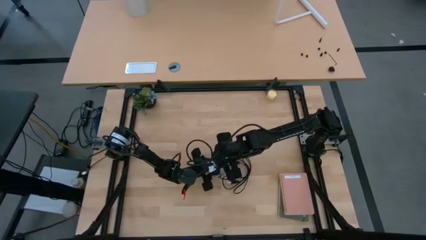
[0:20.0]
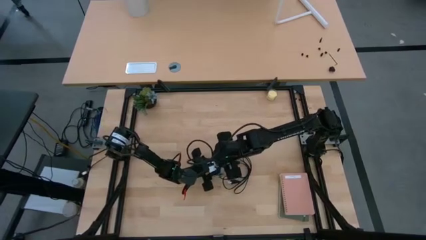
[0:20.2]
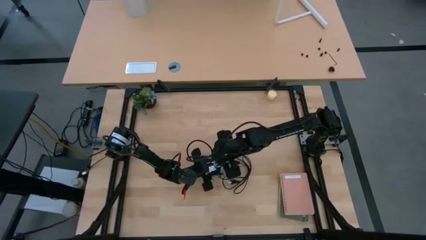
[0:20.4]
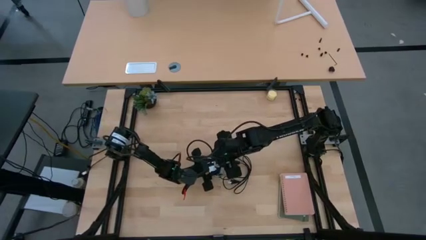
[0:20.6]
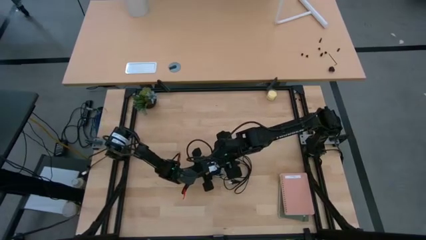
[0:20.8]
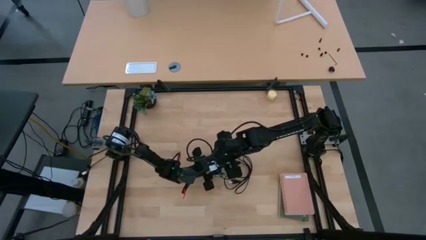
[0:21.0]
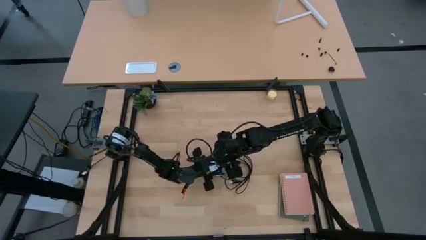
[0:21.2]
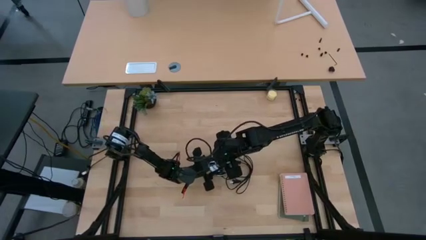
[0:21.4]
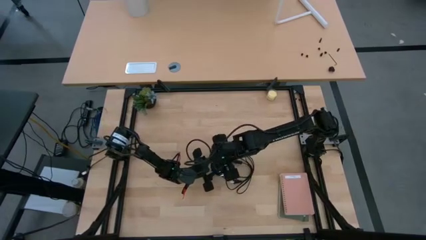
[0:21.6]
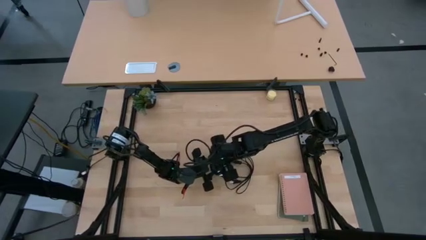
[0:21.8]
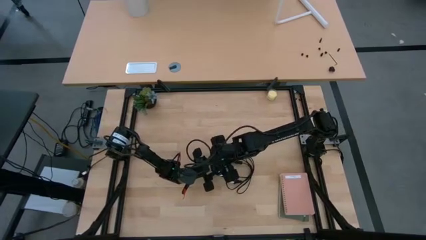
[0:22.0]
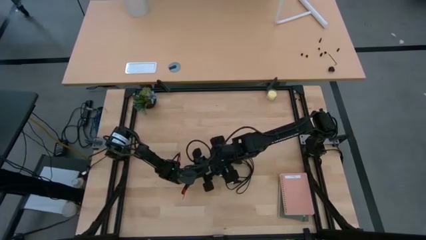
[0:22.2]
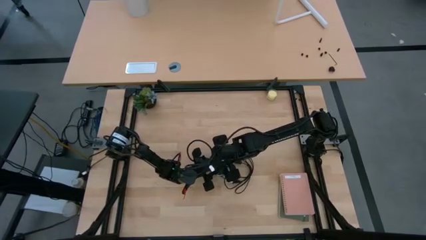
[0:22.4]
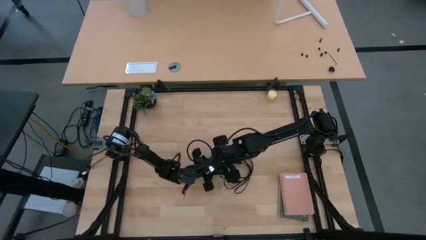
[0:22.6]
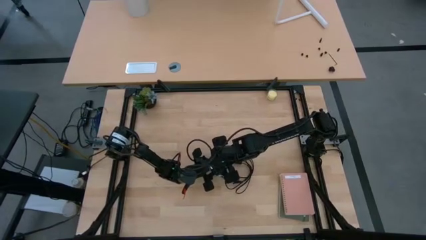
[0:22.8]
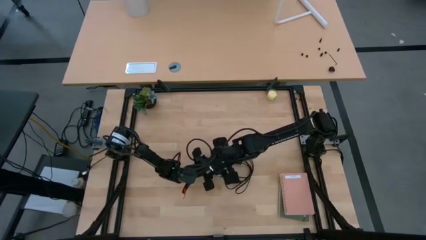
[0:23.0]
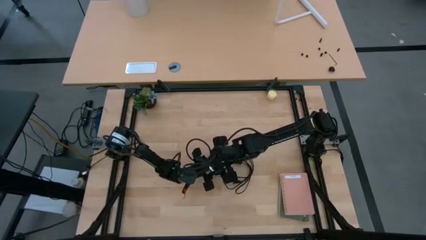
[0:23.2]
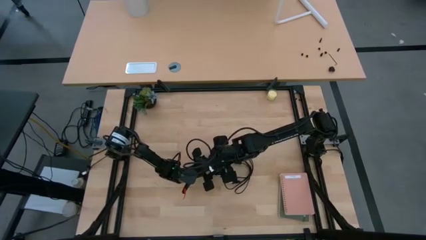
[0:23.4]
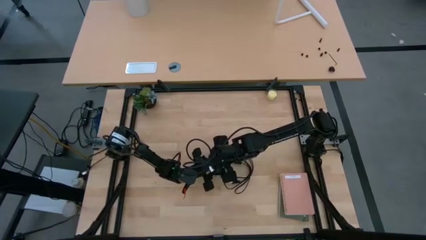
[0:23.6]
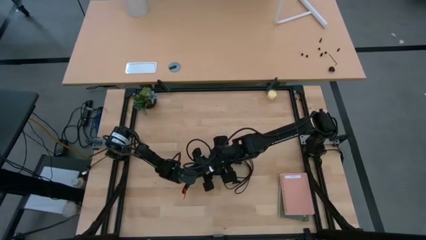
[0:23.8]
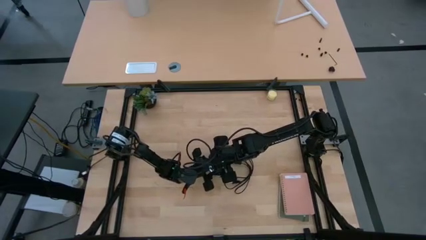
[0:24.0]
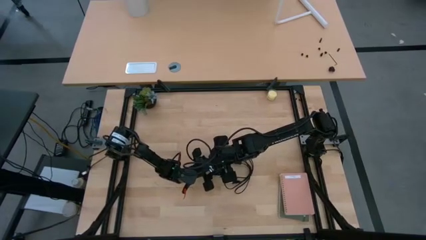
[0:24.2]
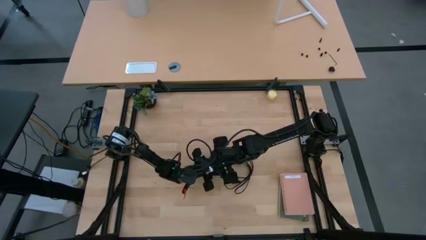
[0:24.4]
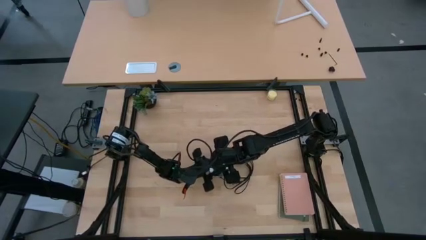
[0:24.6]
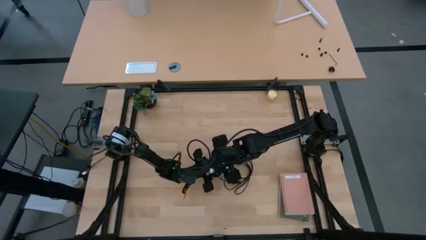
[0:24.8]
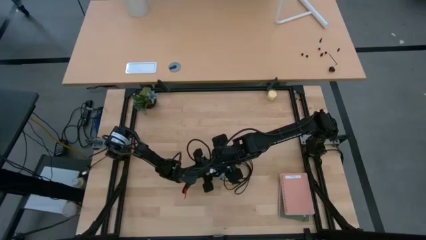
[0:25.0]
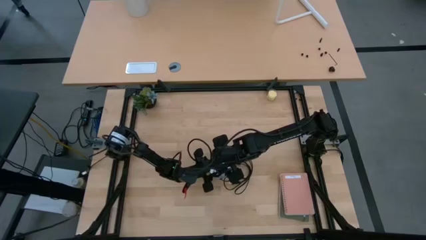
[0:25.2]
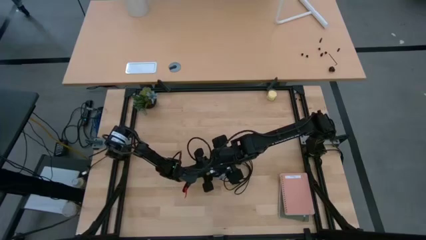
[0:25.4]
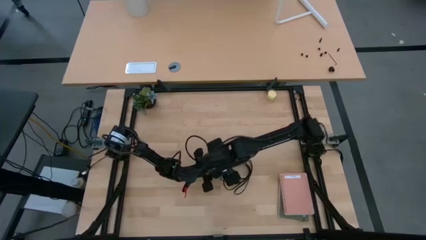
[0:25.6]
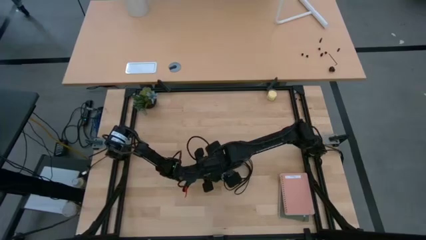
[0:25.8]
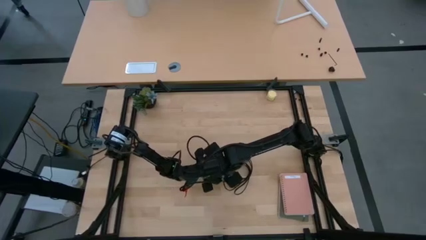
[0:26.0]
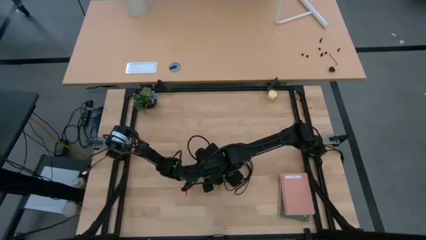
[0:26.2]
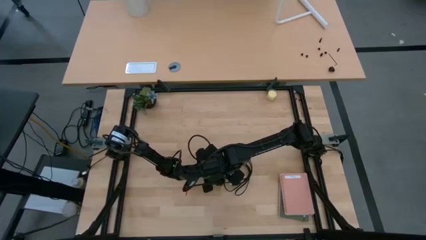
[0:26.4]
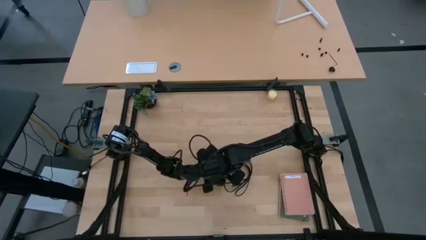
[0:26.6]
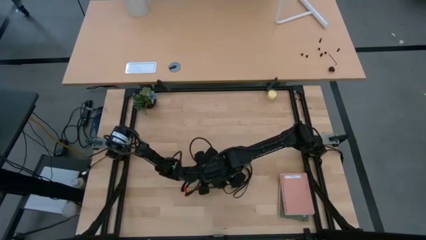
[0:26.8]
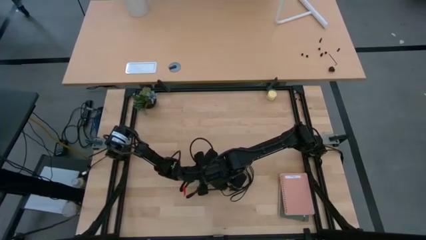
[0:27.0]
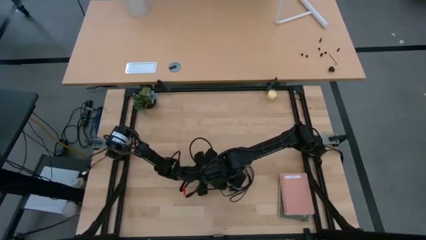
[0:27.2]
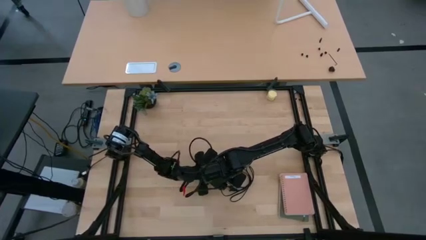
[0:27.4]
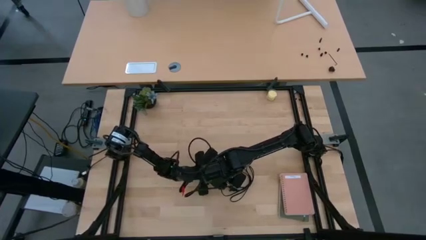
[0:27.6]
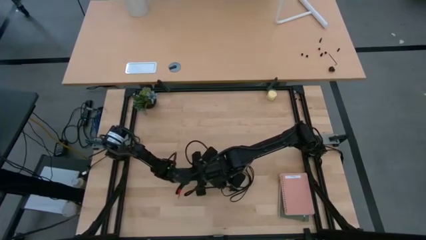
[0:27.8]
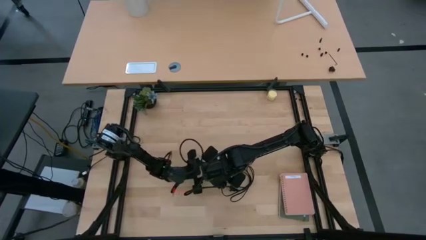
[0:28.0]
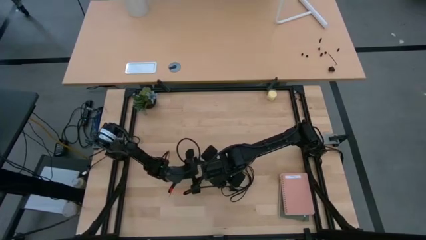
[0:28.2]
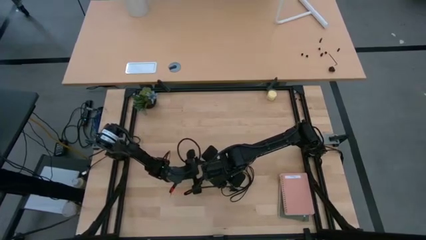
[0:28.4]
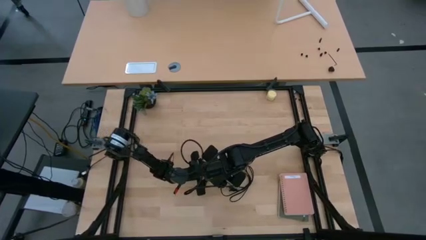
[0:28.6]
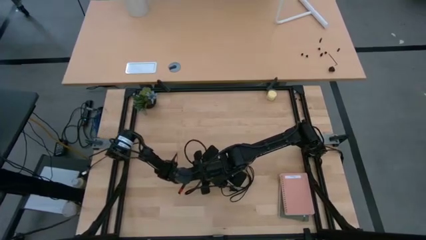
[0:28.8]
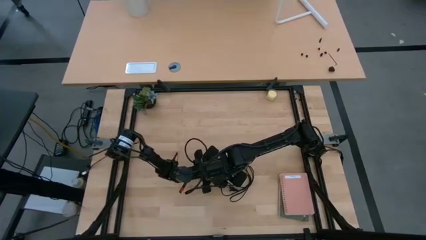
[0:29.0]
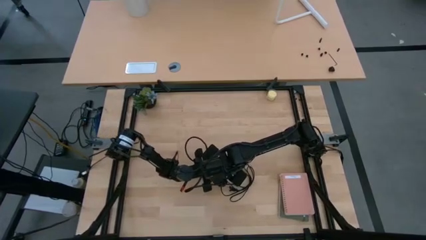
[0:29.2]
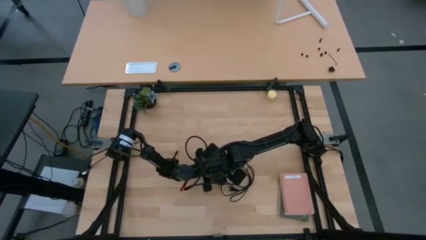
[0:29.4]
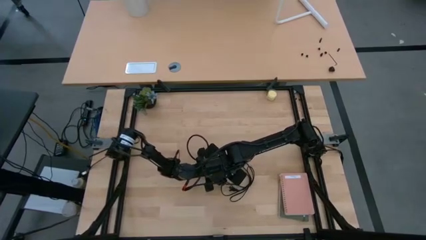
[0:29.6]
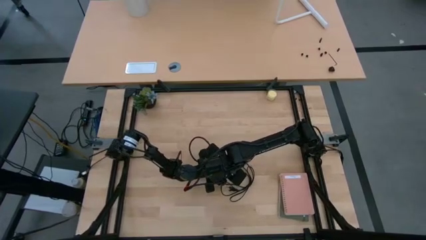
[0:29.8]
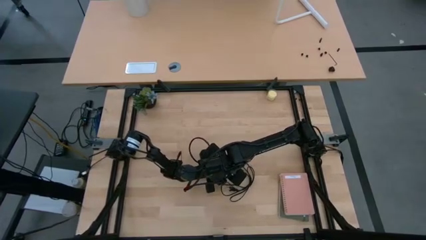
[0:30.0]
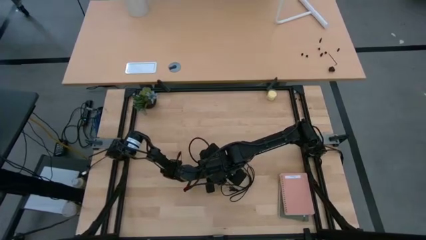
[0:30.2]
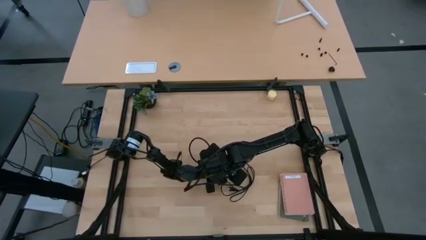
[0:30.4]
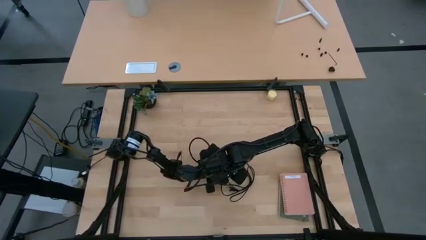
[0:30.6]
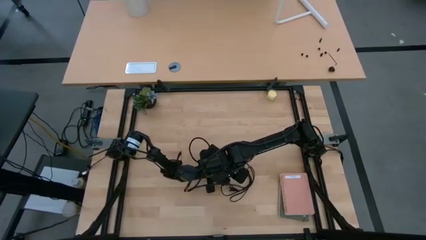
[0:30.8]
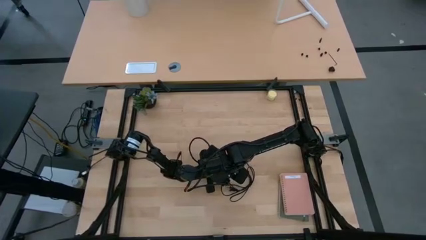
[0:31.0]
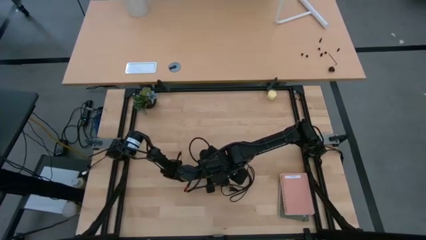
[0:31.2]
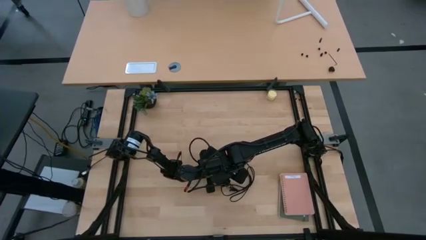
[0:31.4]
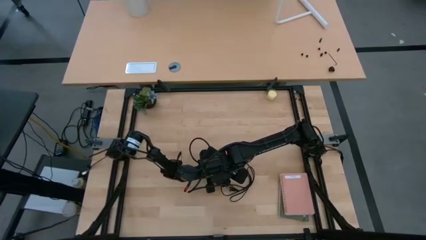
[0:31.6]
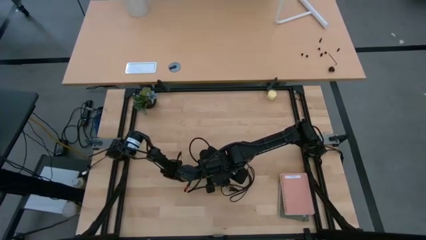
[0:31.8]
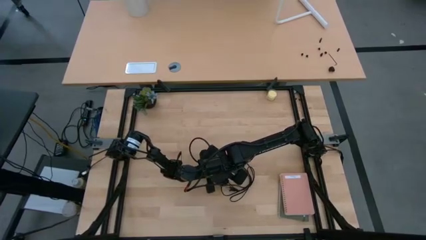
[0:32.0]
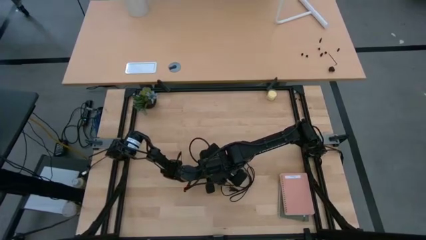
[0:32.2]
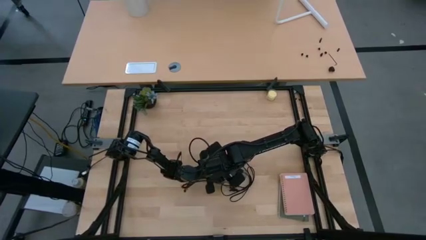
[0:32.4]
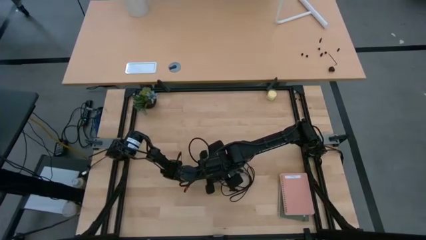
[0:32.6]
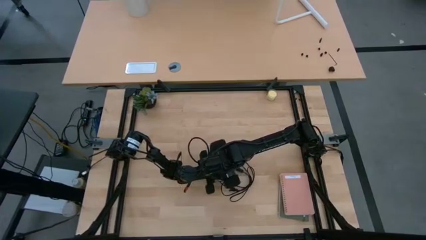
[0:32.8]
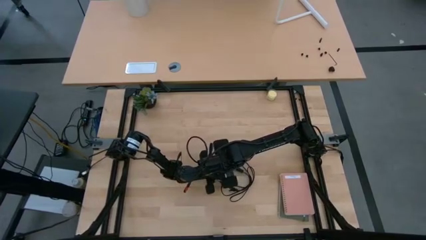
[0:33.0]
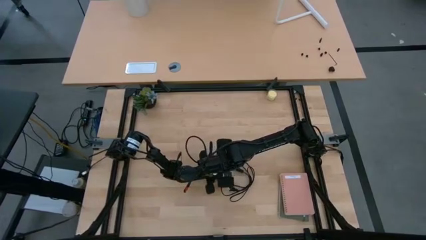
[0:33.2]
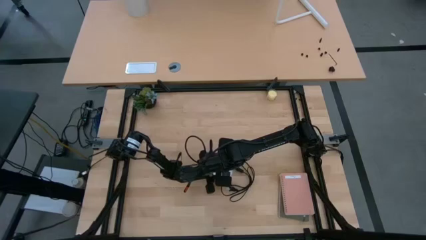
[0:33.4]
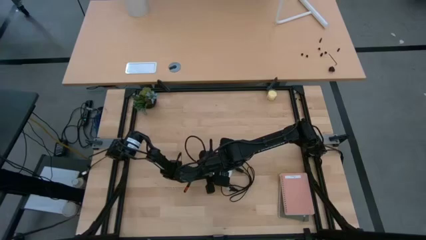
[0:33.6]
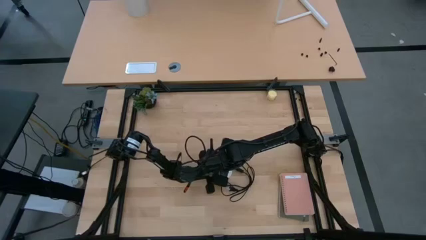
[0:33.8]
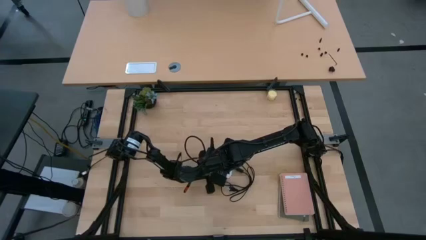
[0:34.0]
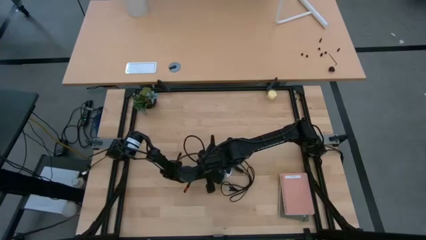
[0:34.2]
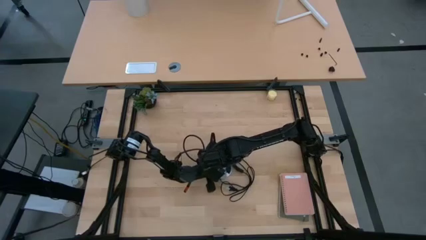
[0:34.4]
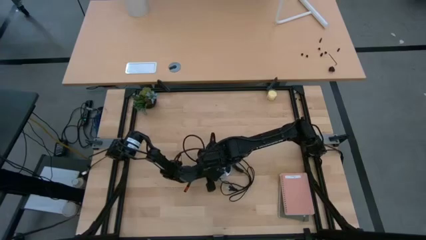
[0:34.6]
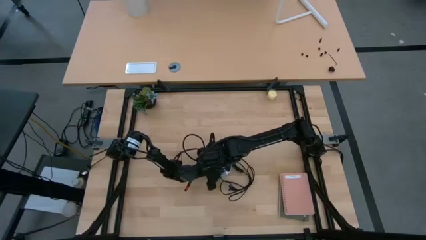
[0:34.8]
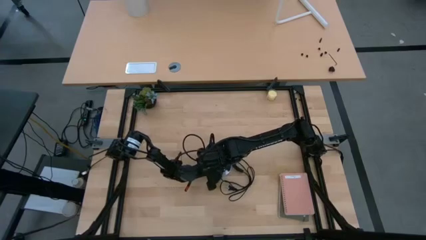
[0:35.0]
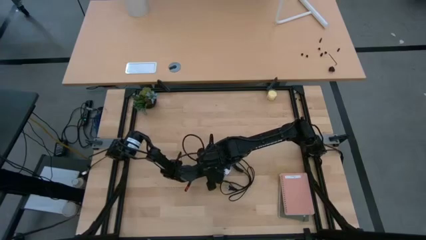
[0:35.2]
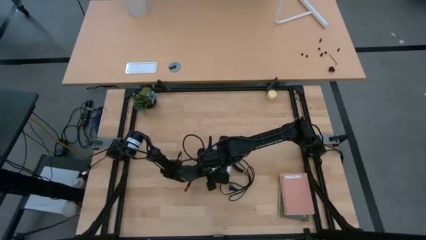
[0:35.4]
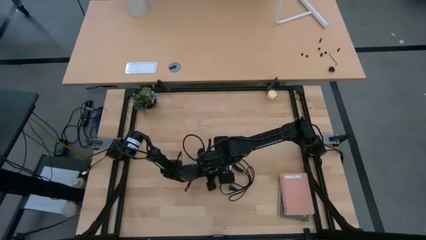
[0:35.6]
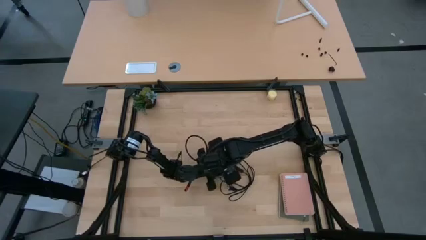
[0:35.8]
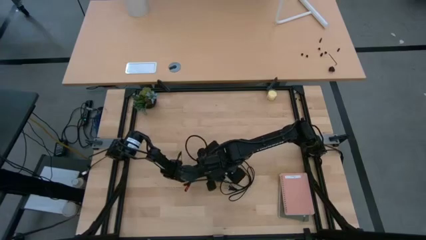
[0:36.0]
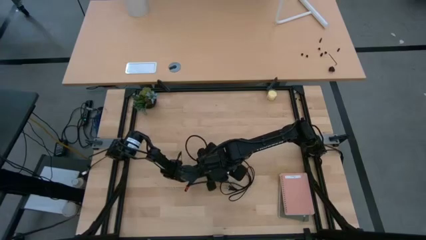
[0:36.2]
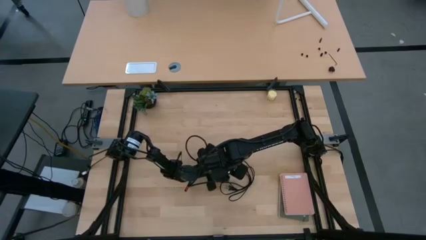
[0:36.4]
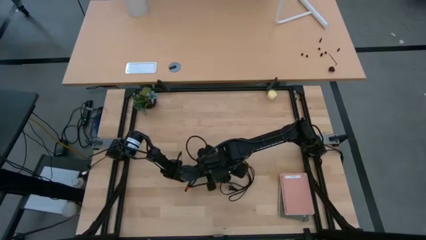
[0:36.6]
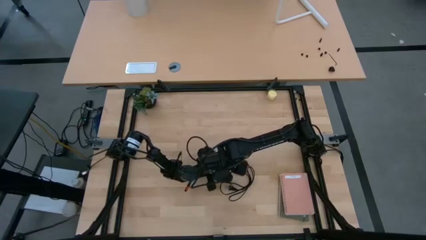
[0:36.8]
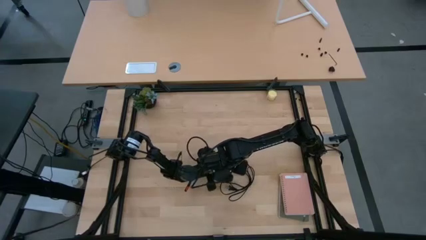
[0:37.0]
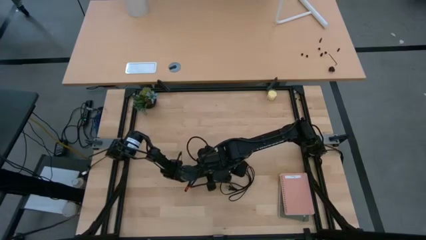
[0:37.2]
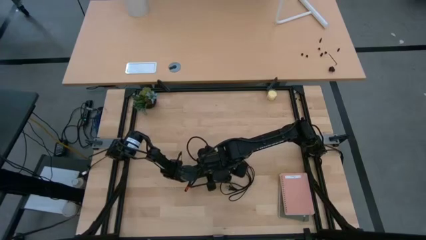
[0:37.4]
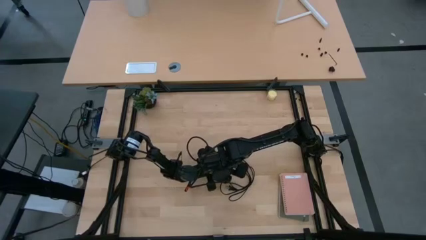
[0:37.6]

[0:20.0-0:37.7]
Task: Screw lightbulb
Insert the white lightbulb into the silver lamp
